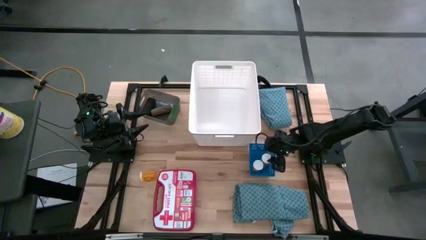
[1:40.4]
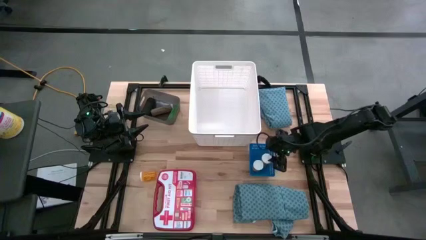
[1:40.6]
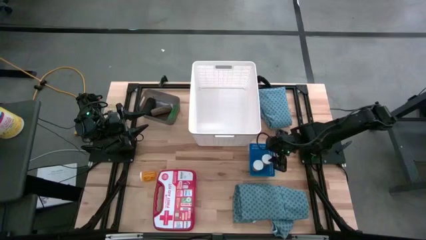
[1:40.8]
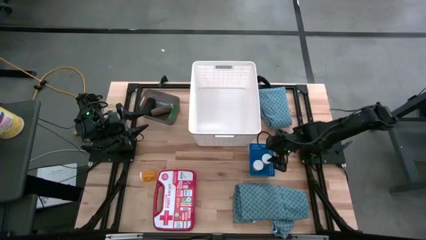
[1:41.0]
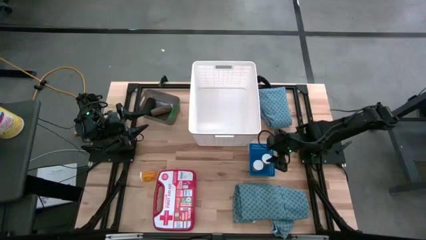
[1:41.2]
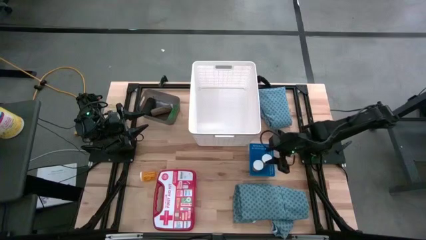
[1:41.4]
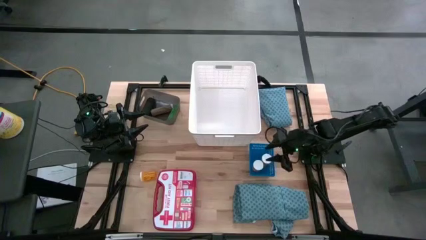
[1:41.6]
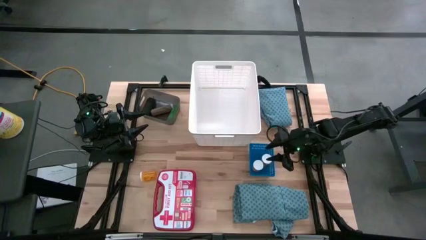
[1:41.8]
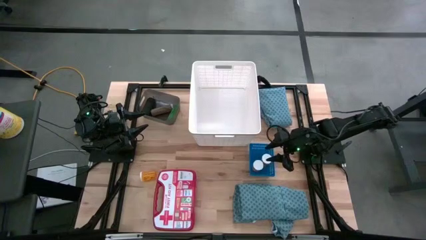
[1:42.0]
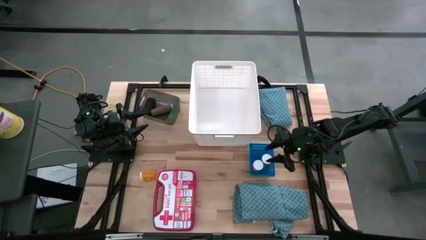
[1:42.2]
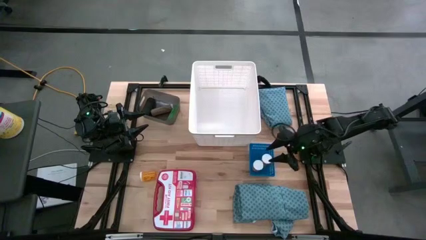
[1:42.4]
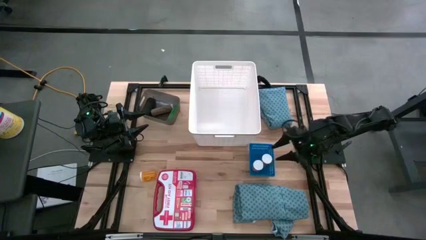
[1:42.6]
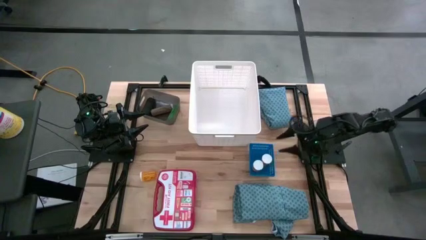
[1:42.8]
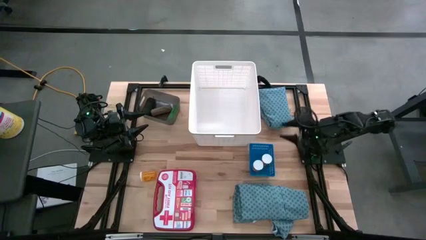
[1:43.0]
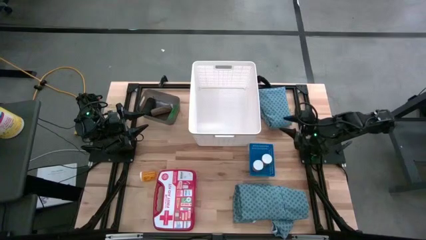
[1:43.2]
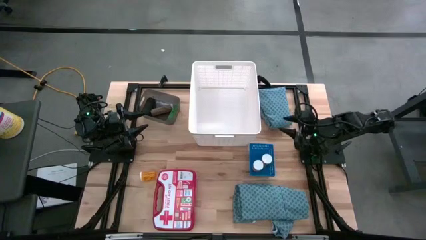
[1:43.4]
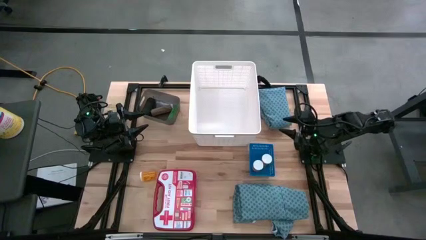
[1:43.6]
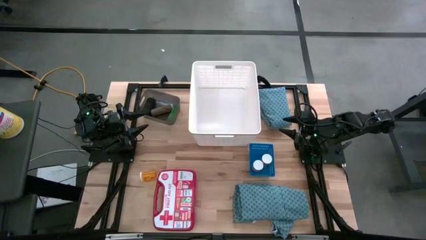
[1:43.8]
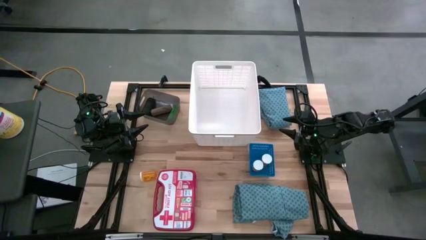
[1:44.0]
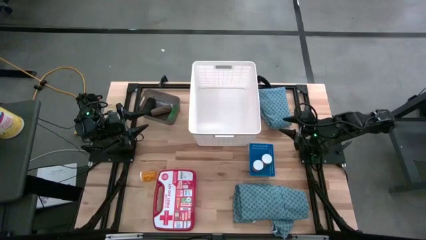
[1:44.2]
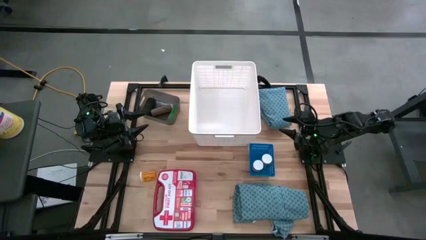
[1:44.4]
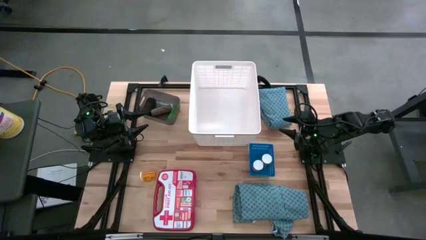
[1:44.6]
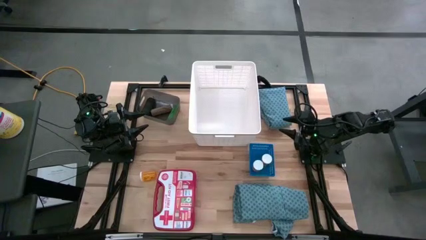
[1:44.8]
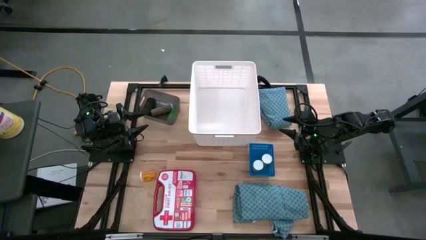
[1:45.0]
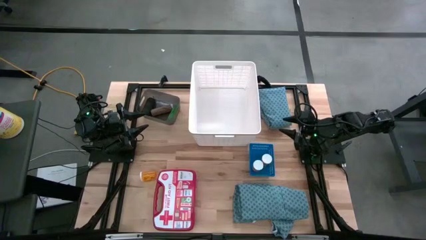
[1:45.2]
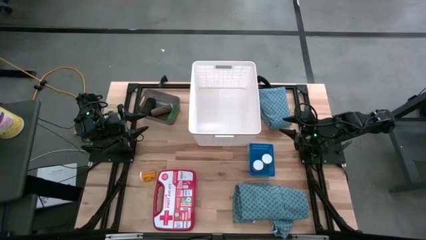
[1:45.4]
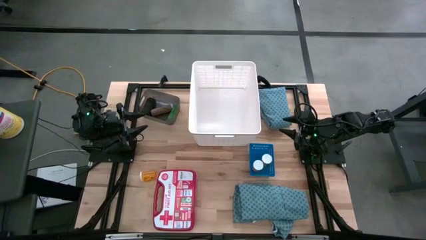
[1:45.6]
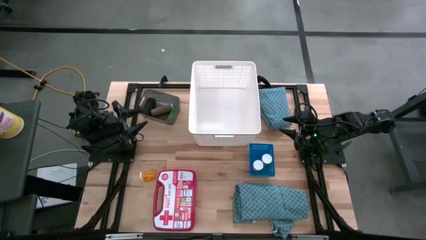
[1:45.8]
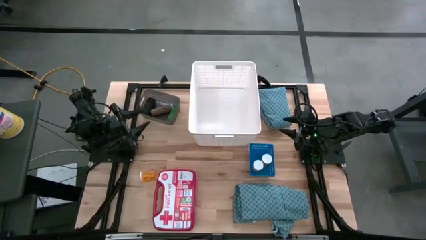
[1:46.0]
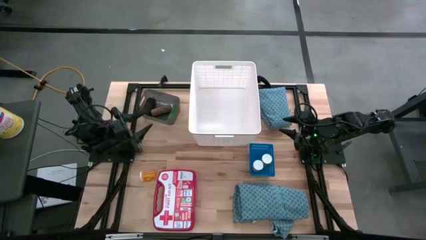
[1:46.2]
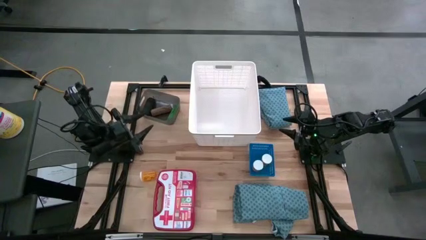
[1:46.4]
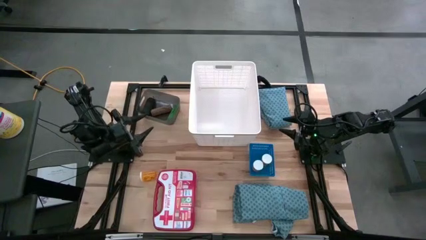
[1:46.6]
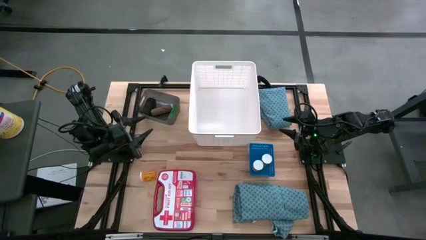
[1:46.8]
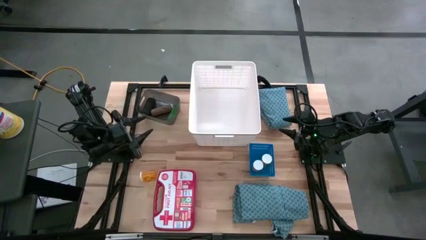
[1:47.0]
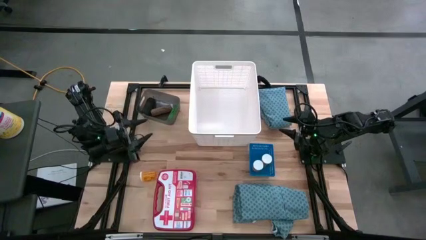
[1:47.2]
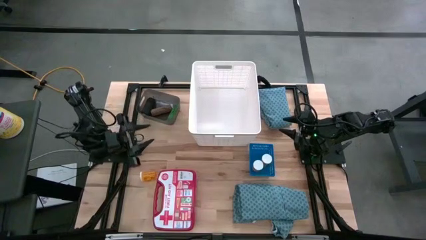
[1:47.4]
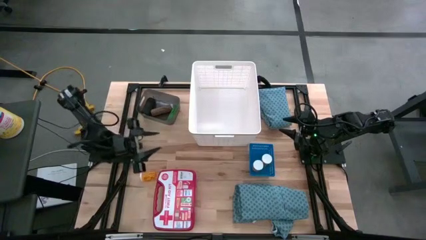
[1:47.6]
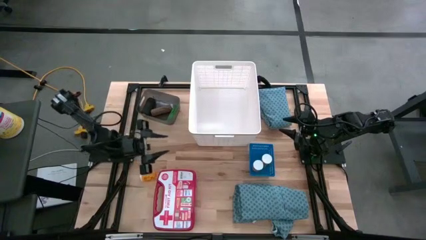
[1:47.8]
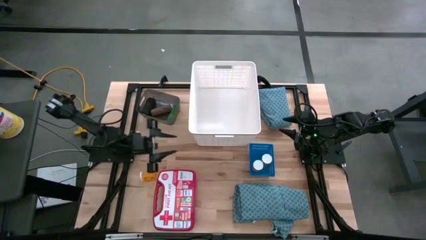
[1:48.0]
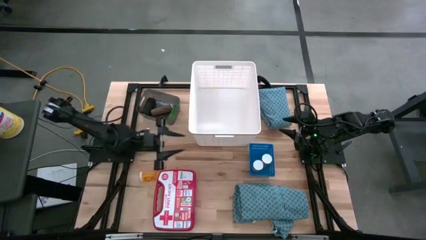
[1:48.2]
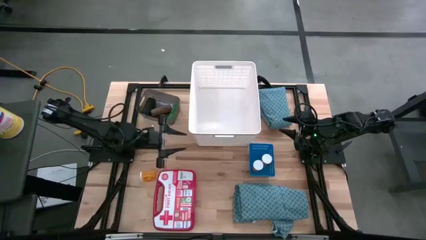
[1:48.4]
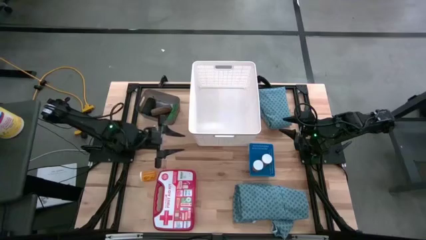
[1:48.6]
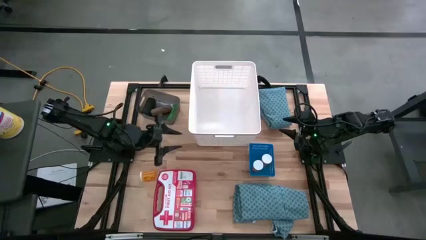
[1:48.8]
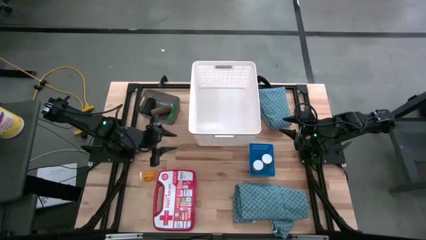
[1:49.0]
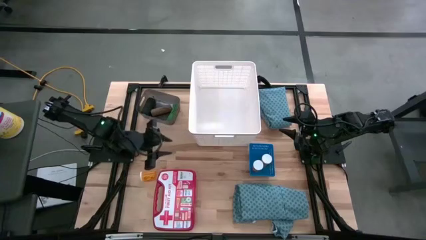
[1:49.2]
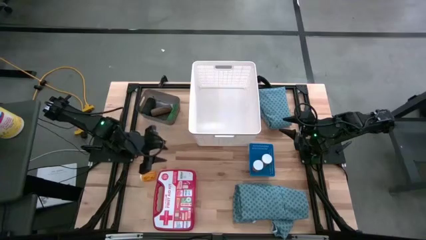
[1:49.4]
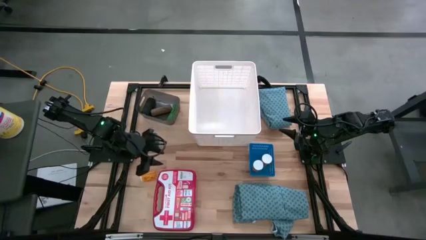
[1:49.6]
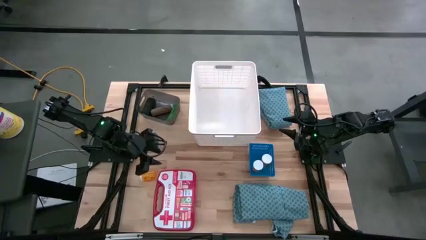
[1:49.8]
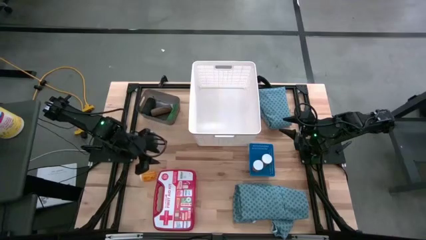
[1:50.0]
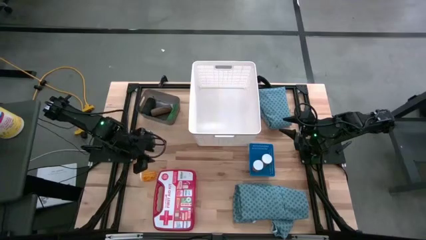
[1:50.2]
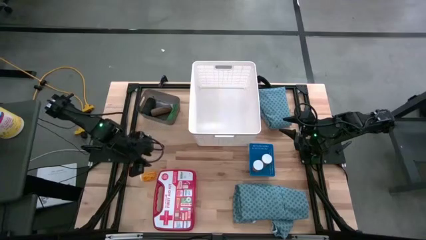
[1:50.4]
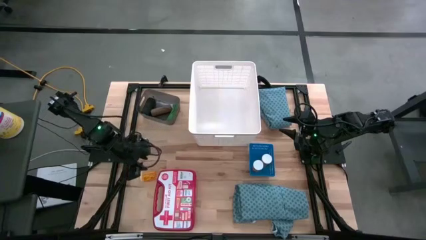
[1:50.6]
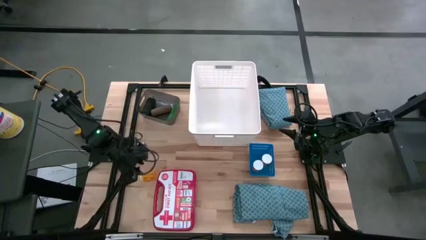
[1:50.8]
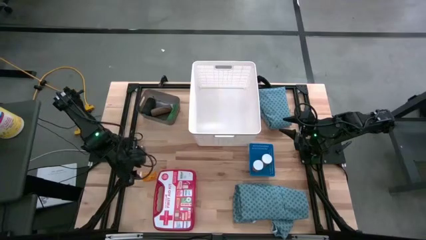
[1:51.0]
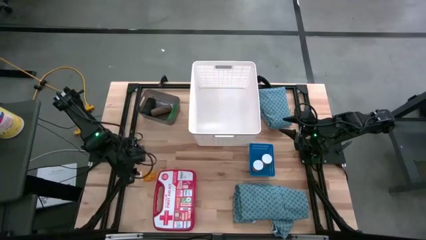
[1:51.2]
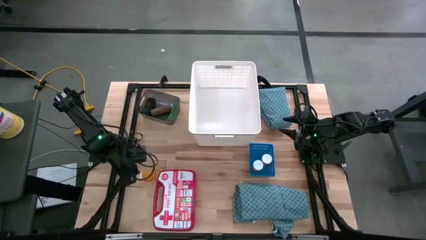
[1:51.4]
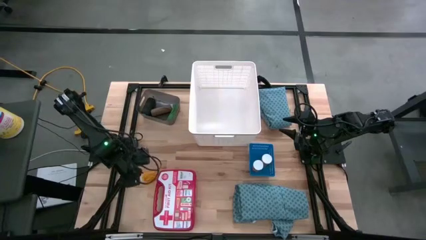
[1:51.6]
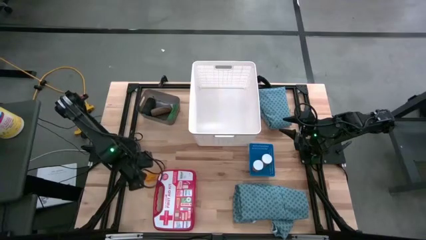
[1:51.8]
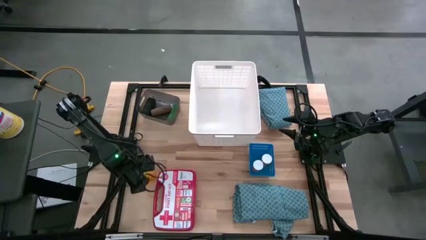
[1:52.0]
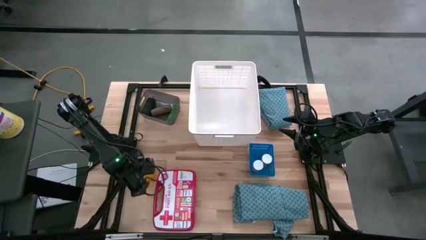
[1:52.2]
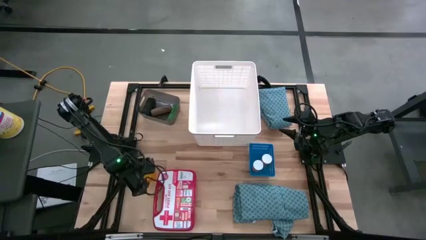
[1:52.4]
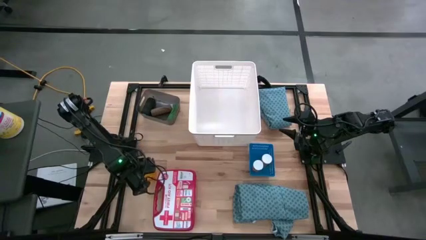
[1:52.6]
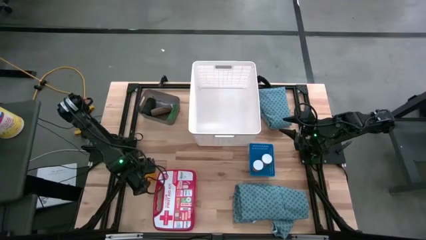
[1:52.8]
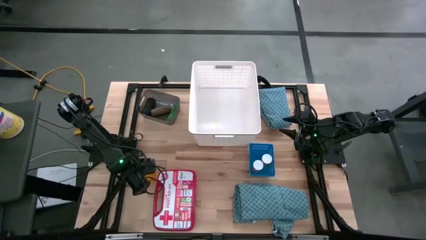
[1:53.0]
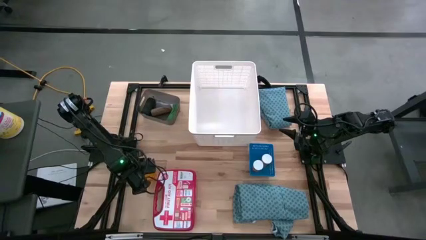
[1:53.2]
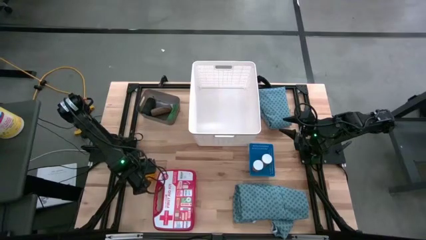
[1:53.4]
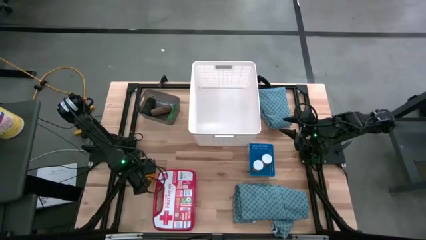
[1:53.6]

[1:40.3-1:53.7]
Task: Pick & place medical supplies in basket/bin
Put the orange pill bottle into the blue bin

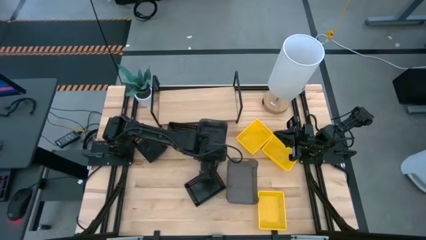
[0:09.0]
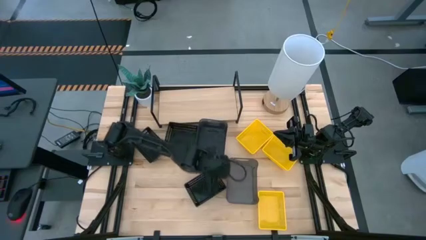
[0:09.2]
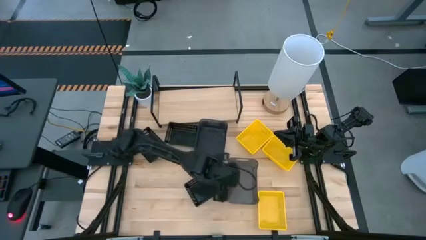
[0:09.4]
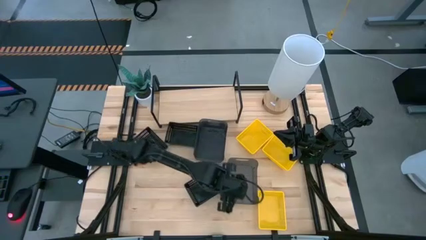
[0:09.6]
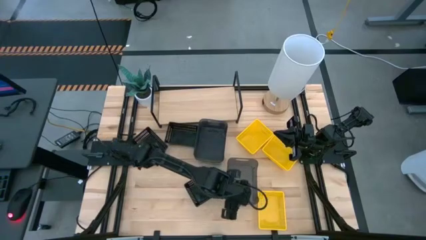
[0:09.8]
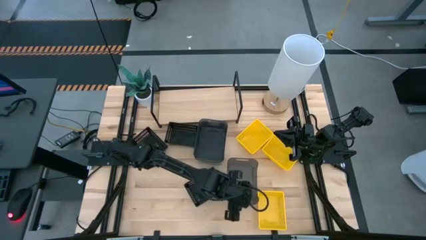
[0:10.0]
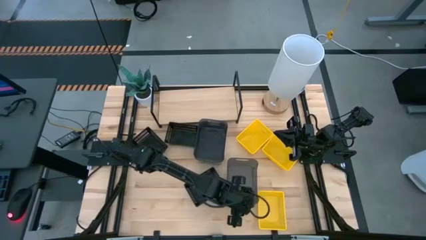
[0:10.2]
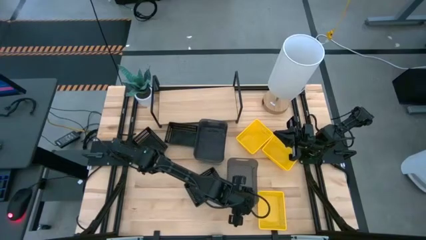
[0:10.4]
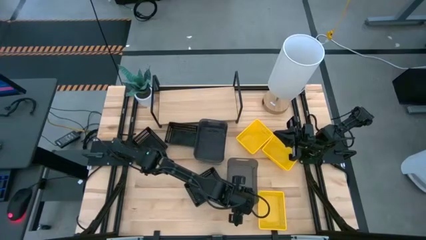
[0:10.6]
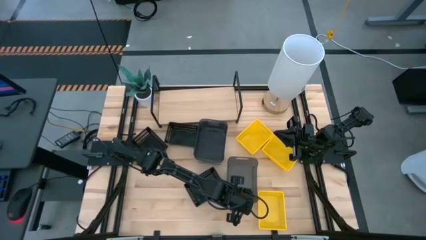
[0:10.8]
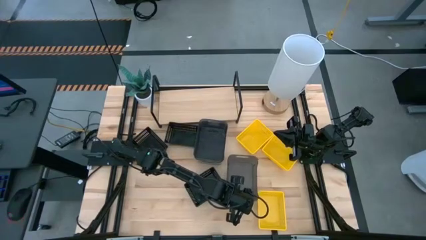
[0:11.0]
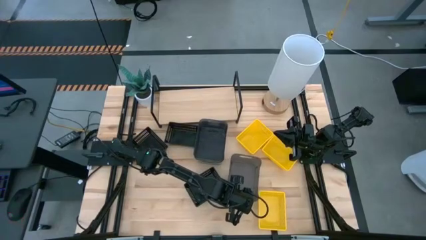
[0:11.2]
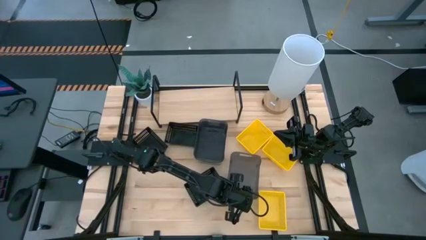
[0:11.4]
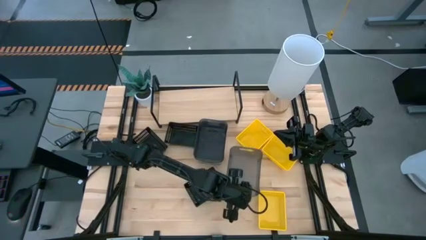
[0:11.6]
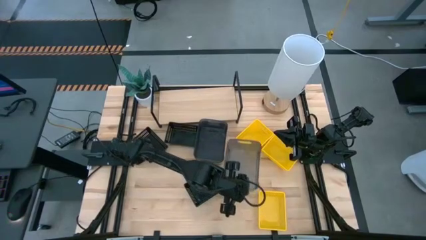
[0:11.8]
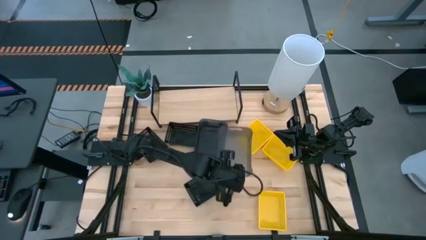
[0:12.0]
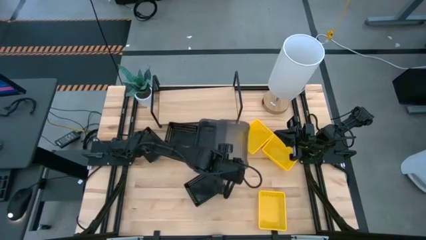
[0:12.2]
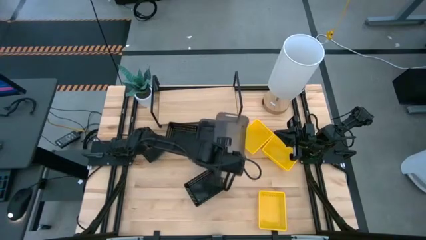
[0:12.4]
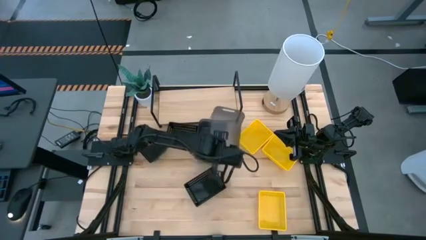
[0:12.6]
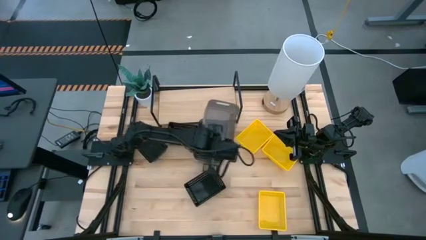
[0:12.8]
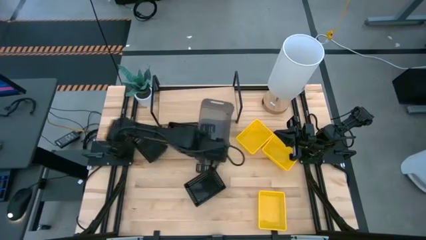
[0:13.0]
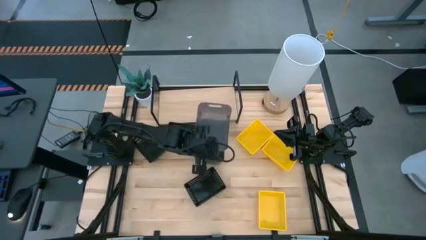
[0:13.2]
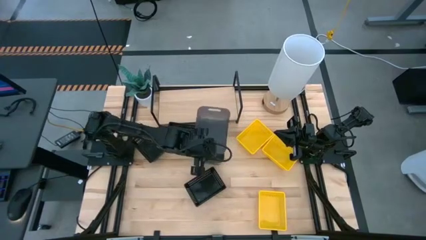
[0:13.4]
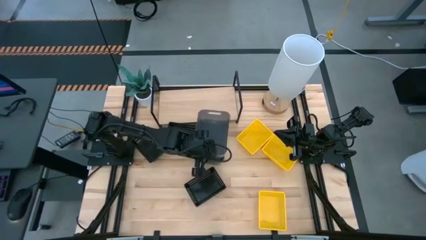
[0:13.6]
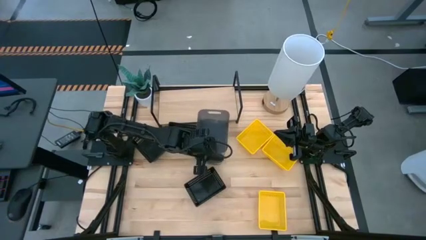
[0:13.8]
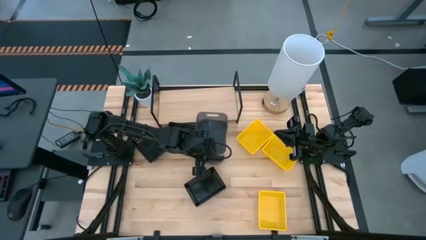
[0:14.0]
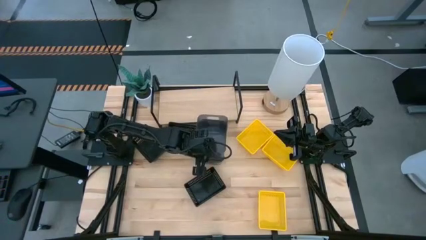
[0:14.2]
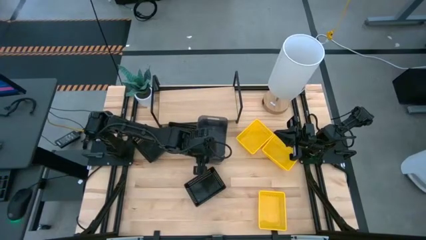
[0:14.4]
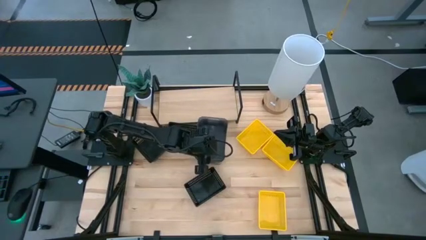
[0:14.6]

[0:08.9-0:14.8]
Task: Stack baskets on shelf by color
Stack the bottom black bin on top of the top black bin
